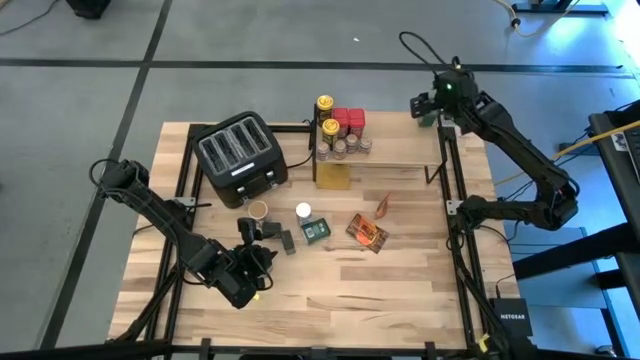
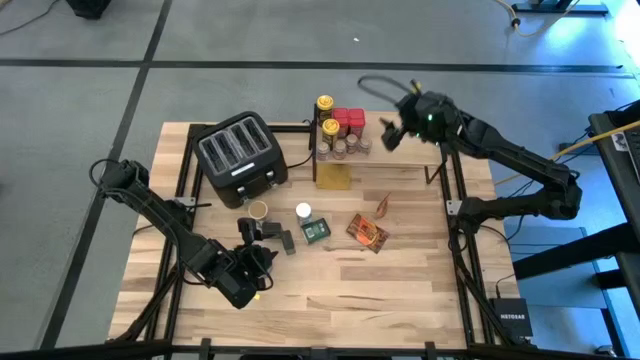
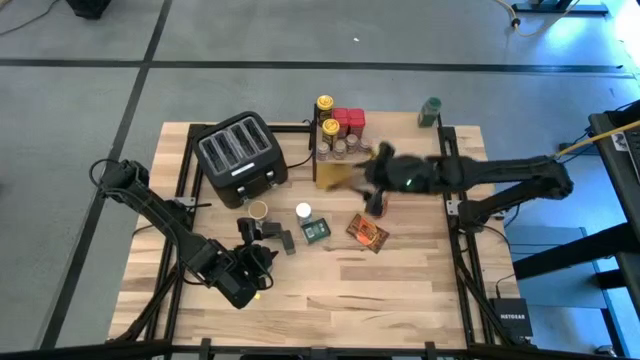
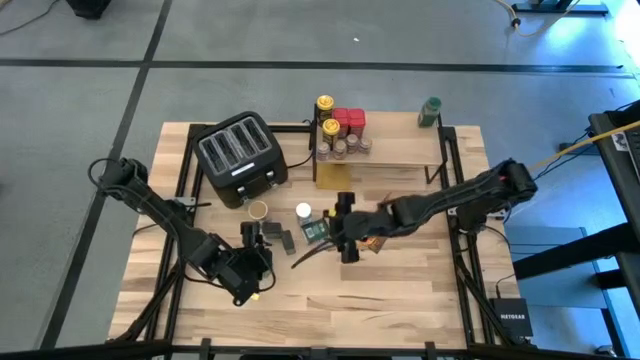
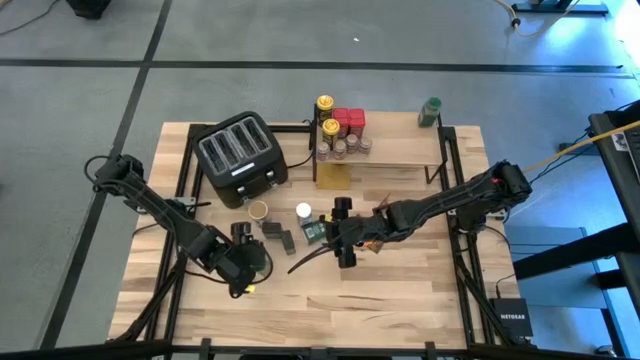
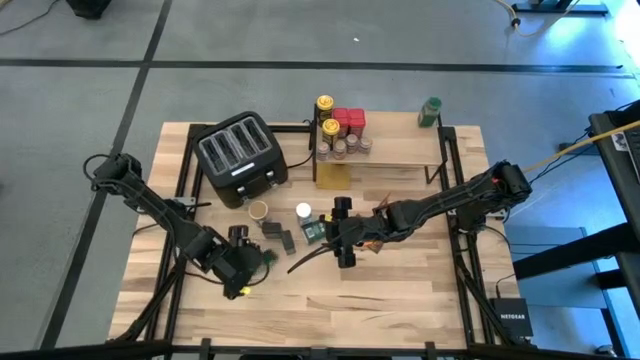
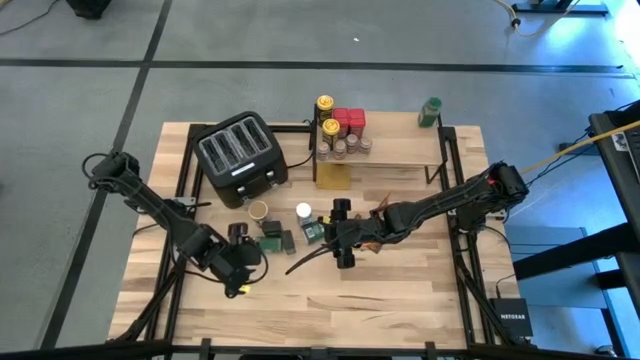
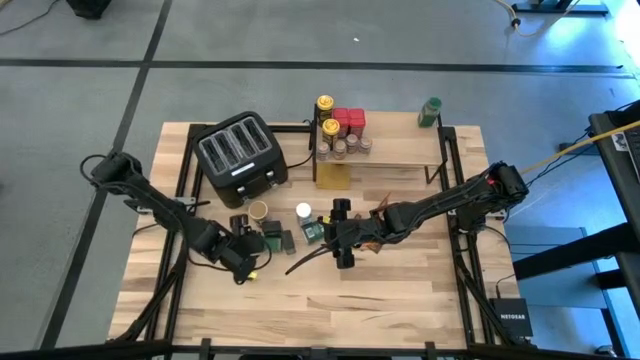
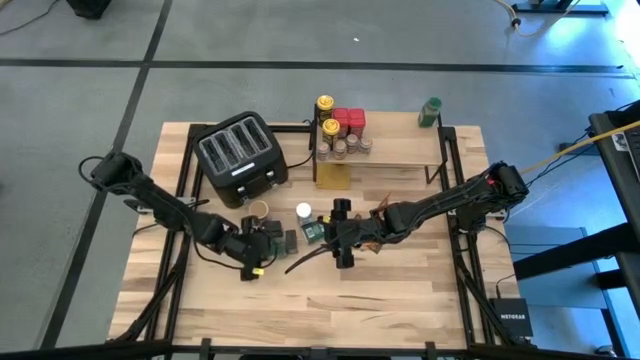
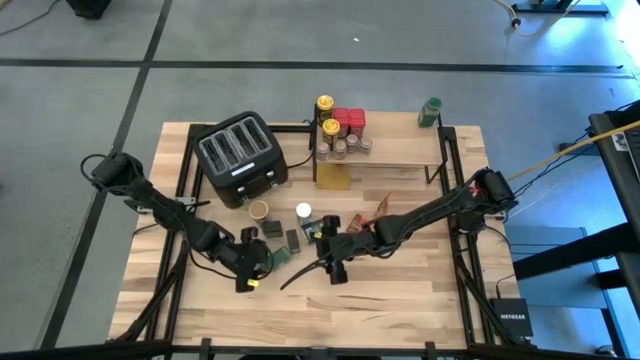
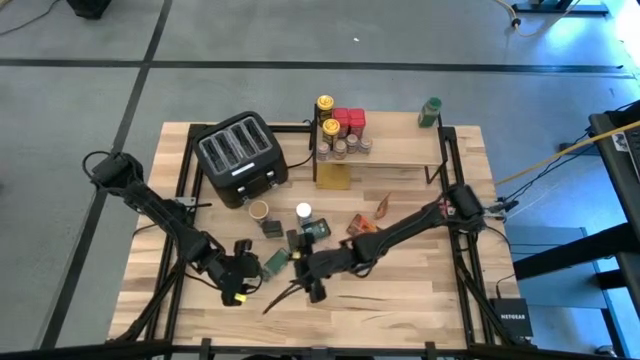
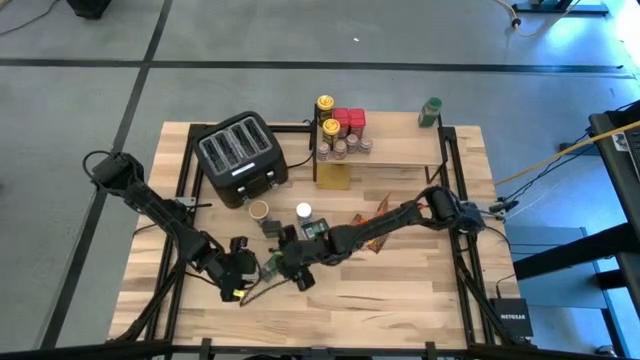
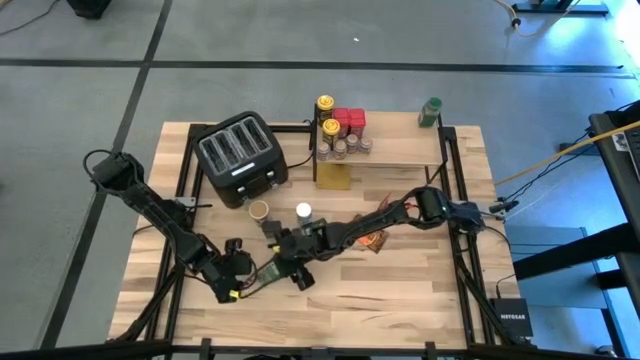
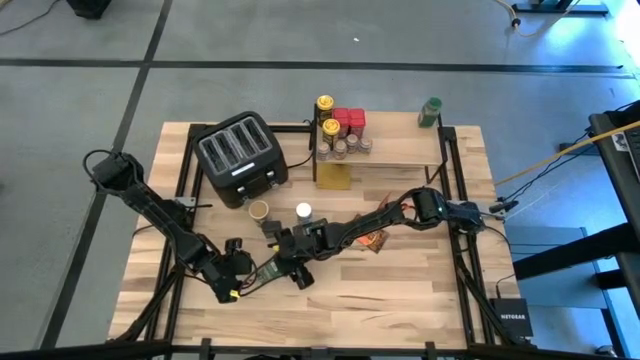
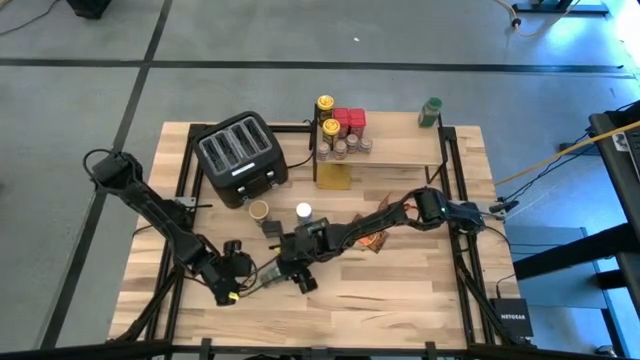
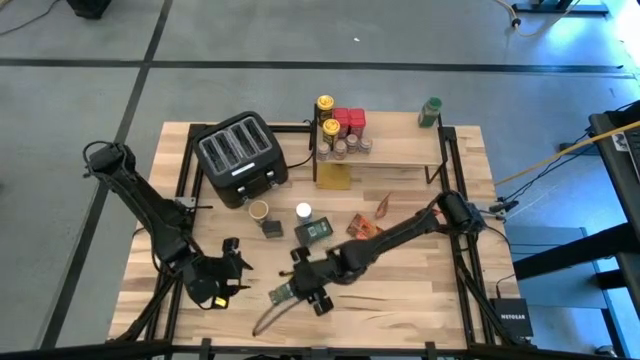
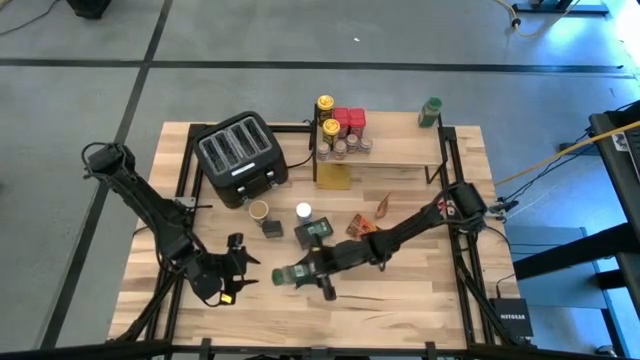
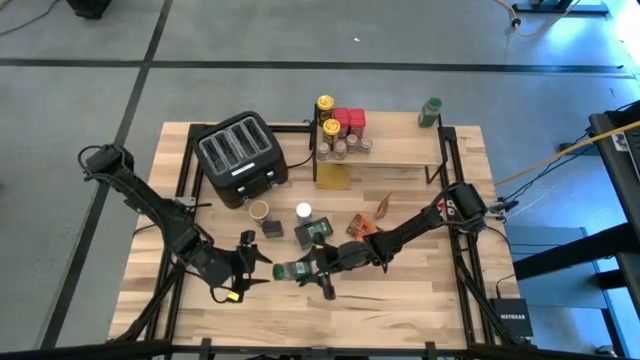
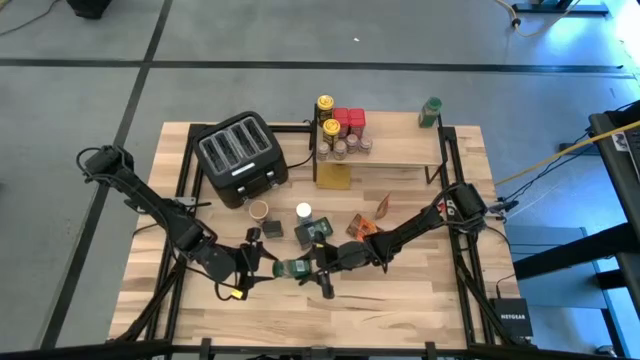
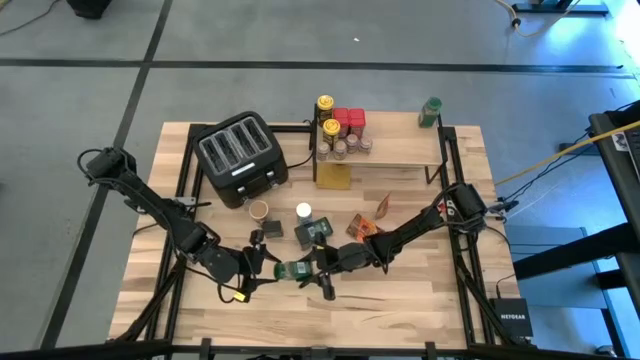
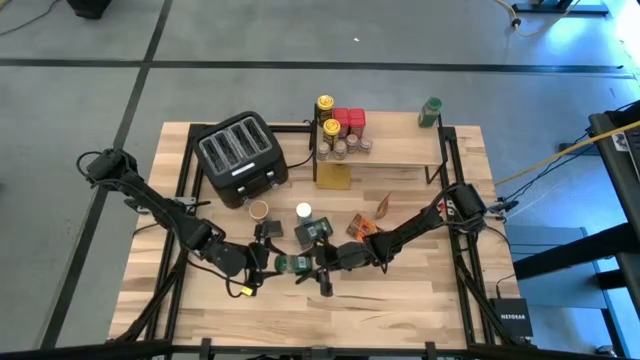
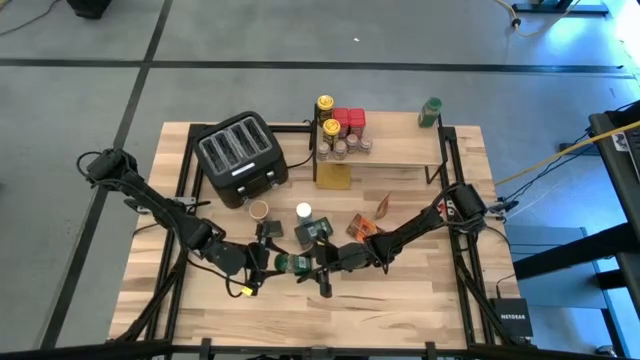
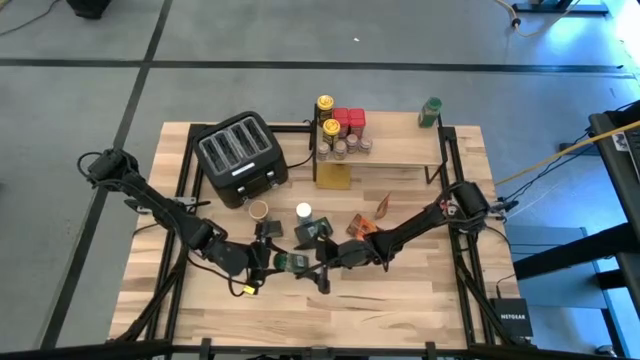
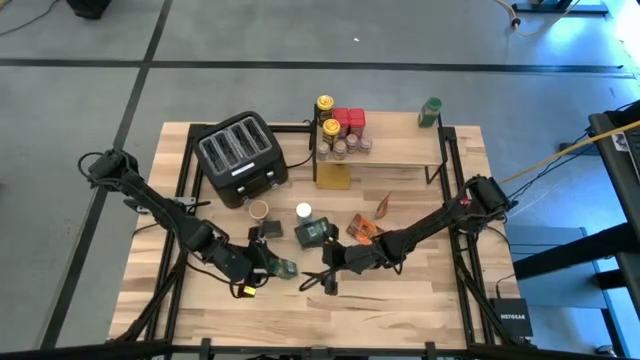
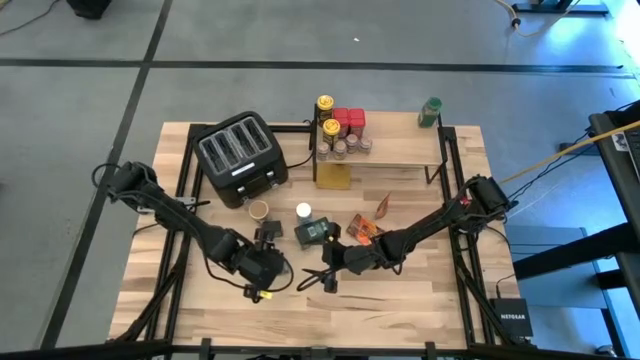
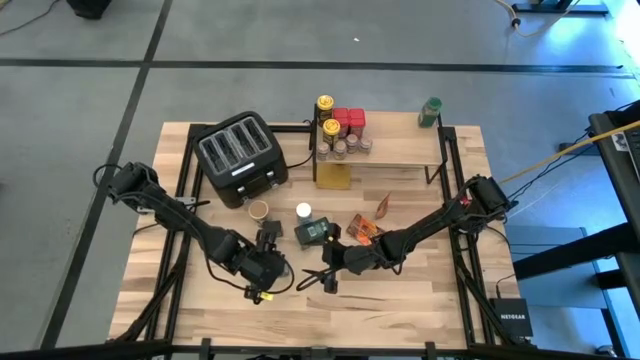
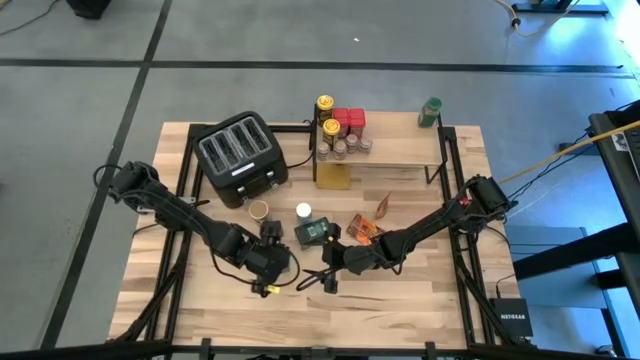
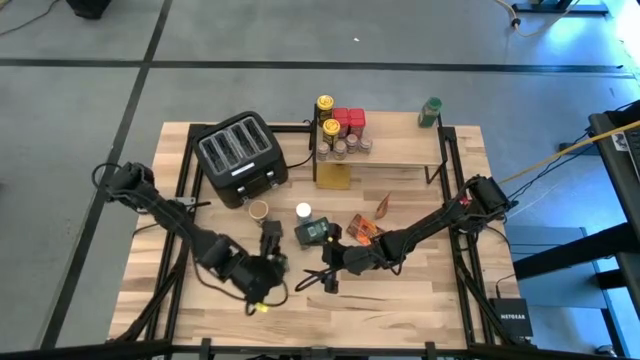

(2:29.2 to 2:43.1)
Task: Shelf spices
Put the green seasoning bottle on the shelf

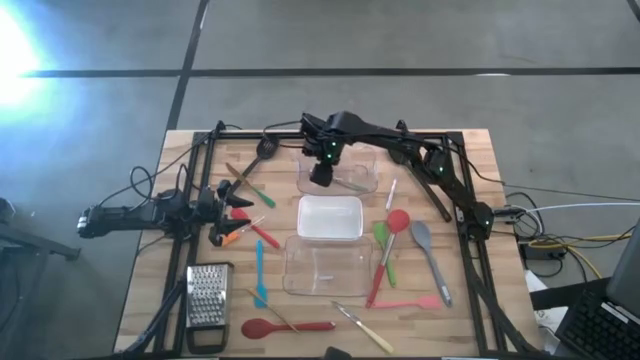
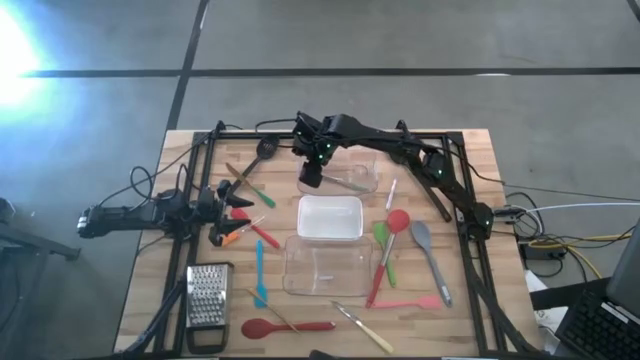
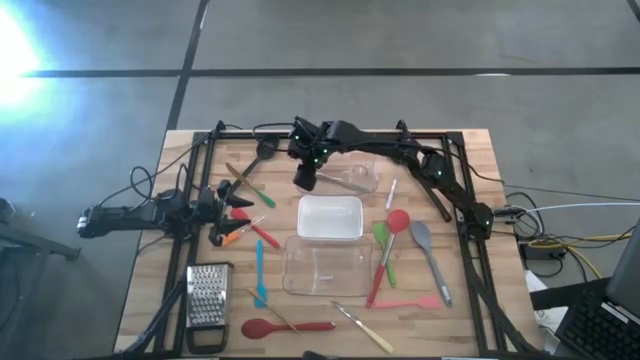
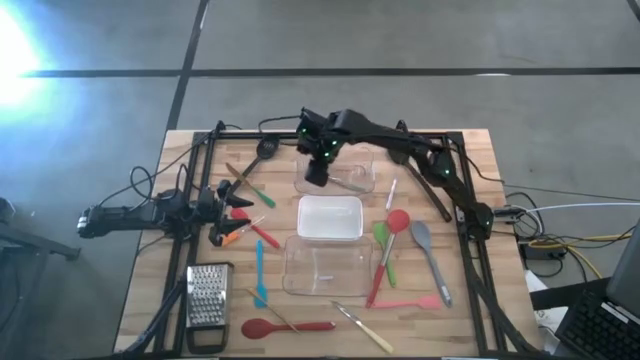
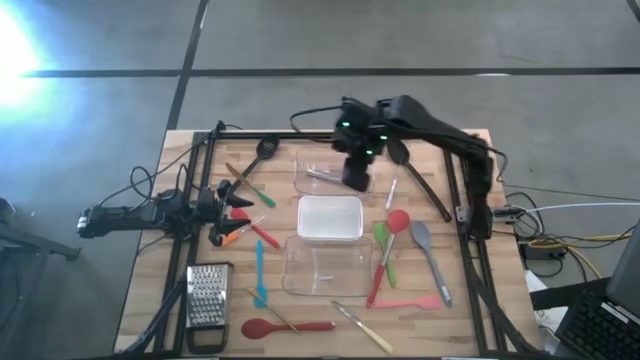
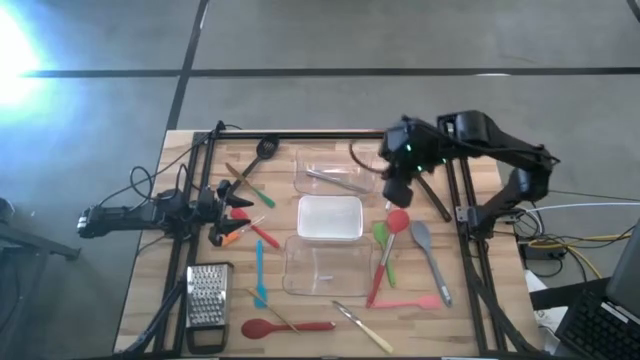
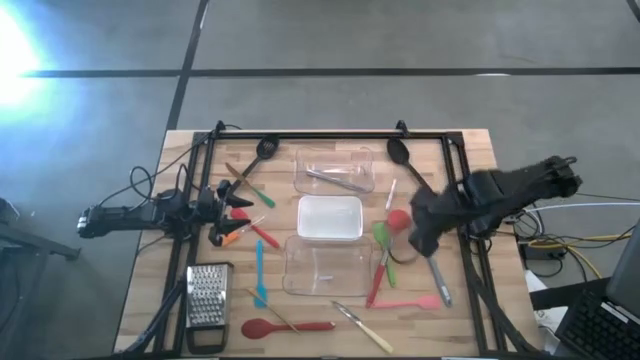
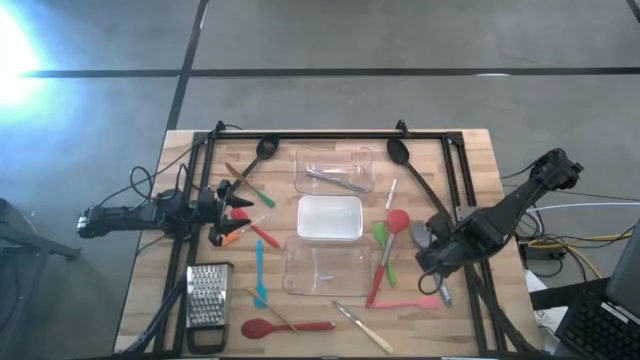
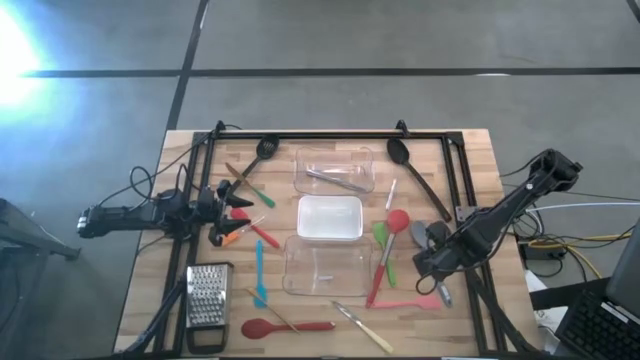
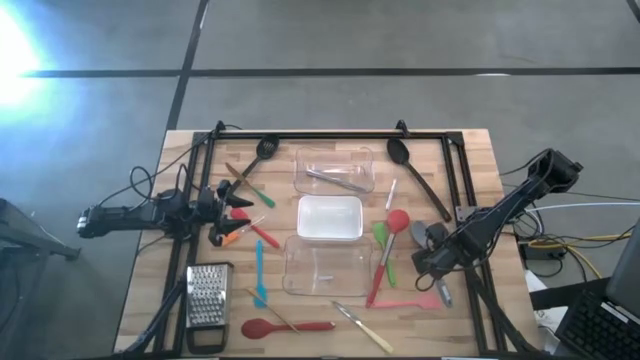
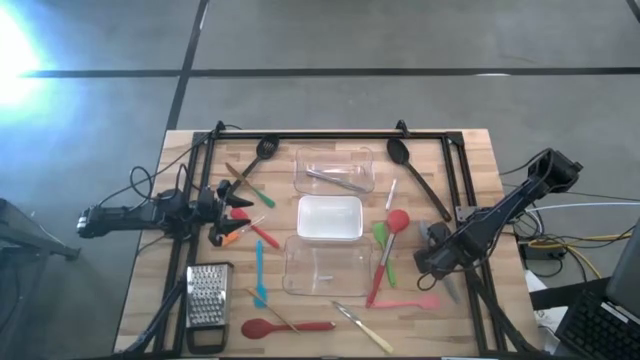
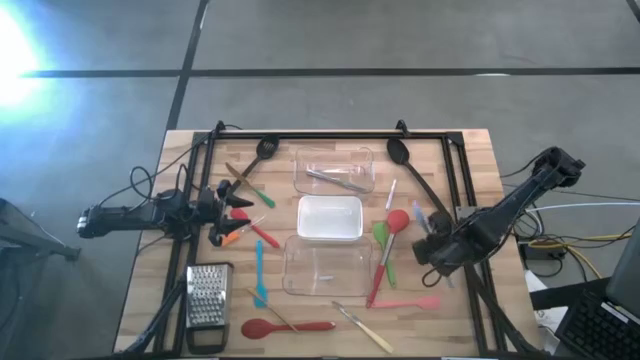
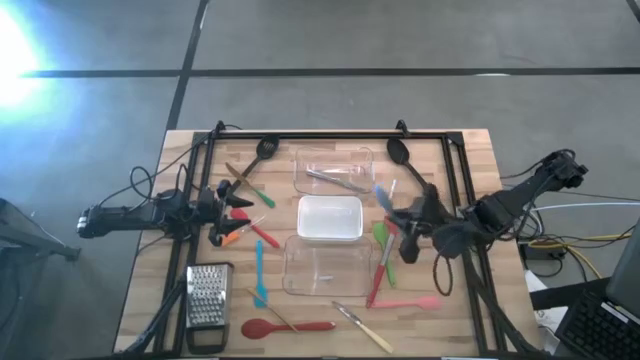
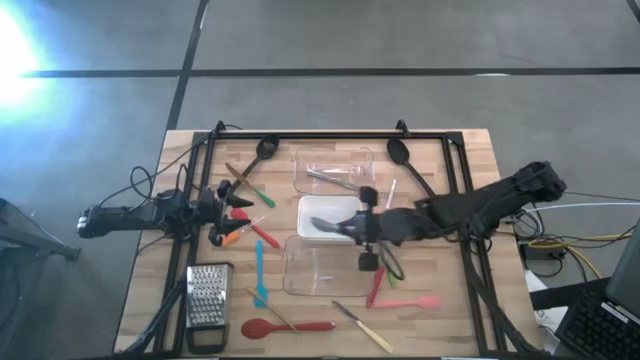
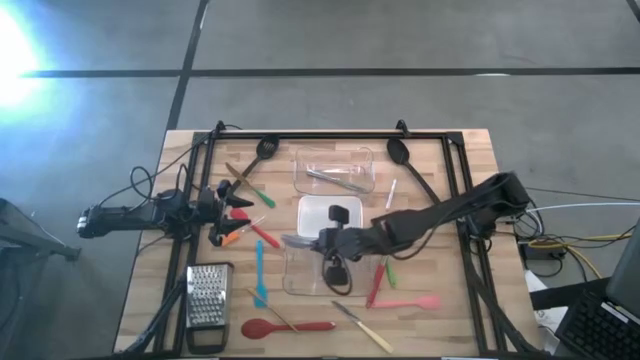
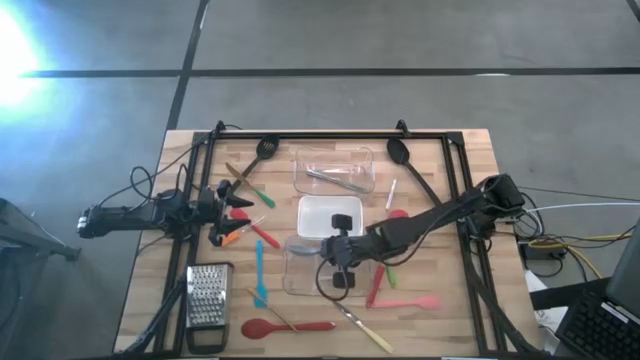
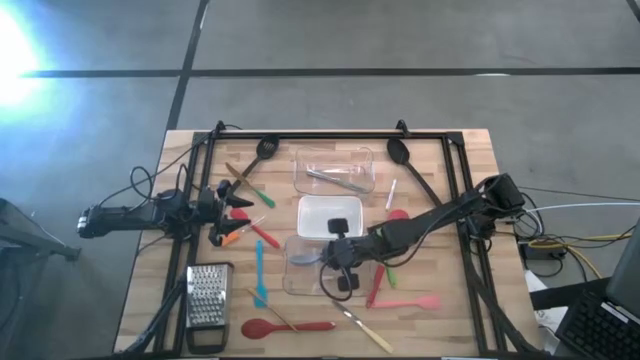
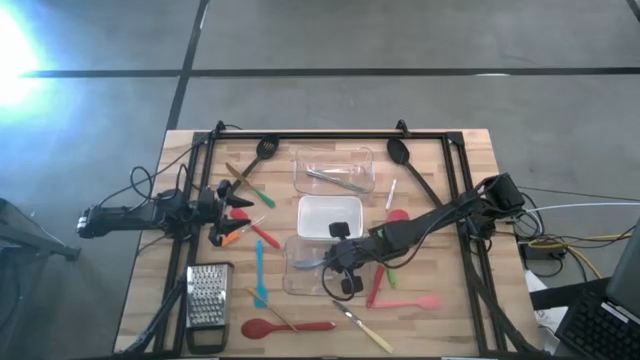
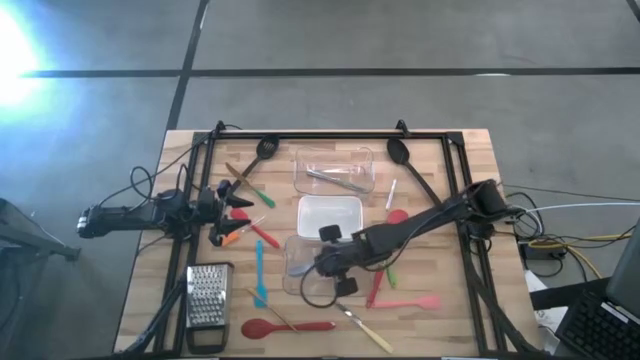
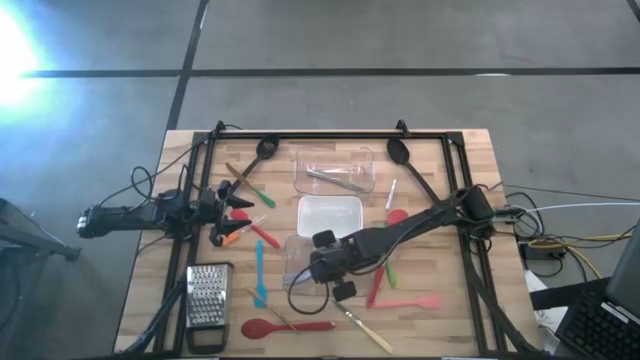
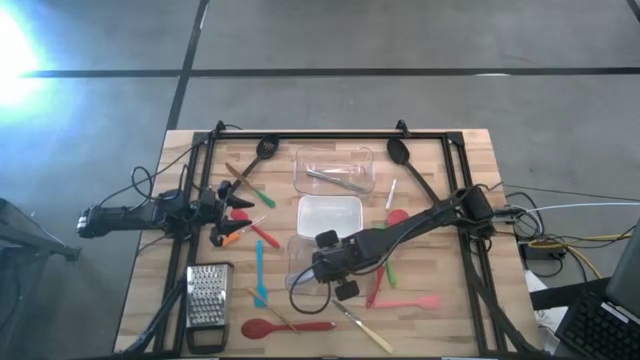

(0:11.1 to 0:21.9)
Task: Pick & Place Kitchen Items
Put the blue serving spoon into the bottom transparent bin
